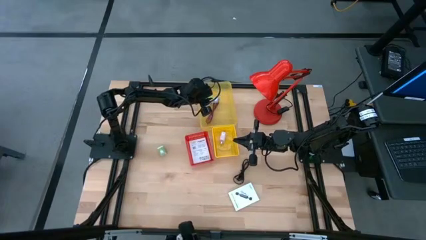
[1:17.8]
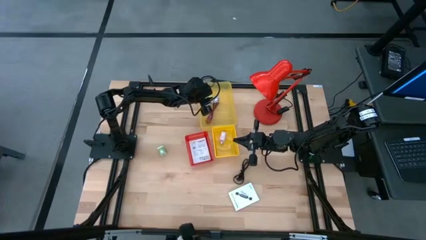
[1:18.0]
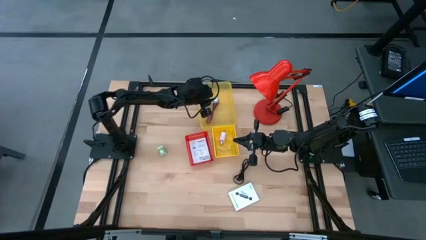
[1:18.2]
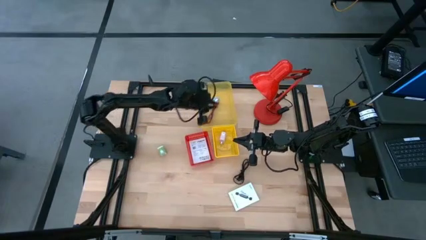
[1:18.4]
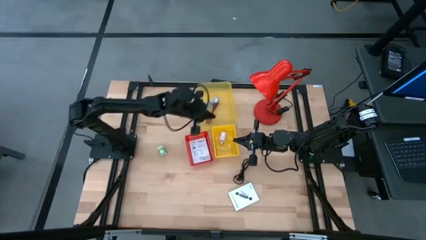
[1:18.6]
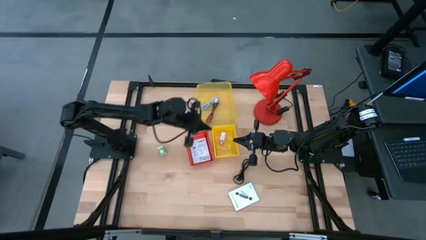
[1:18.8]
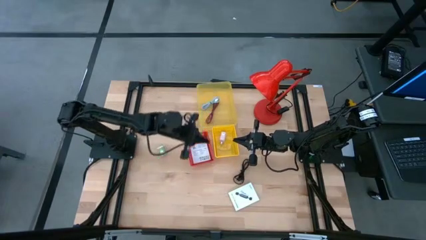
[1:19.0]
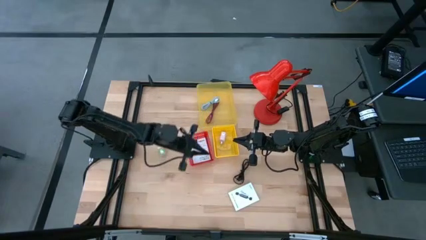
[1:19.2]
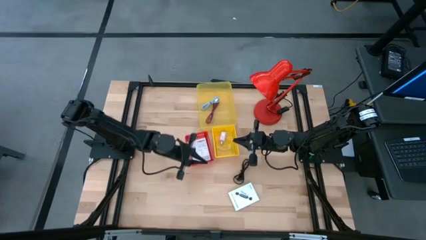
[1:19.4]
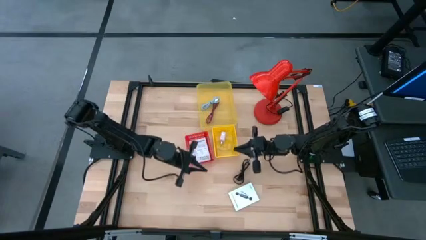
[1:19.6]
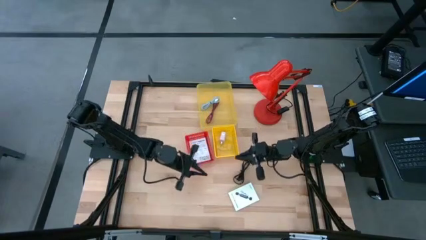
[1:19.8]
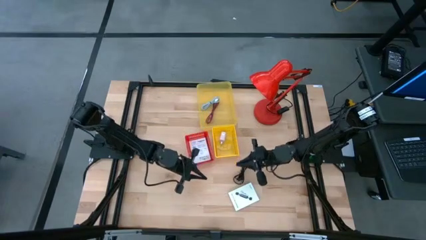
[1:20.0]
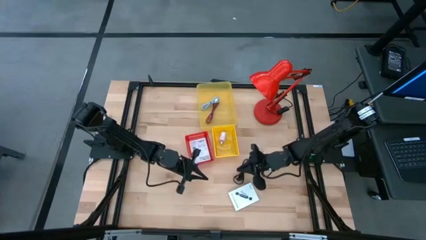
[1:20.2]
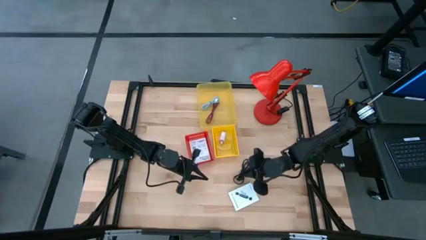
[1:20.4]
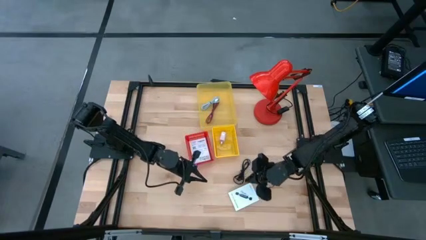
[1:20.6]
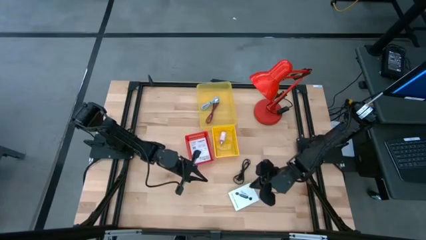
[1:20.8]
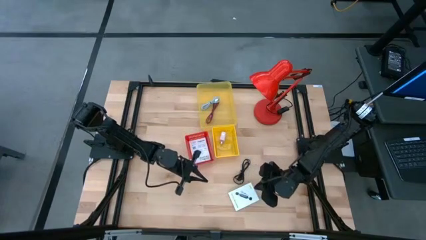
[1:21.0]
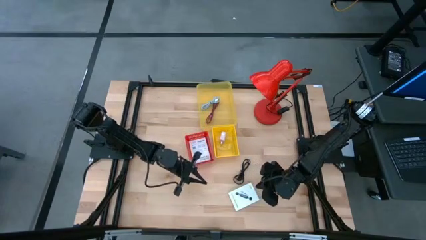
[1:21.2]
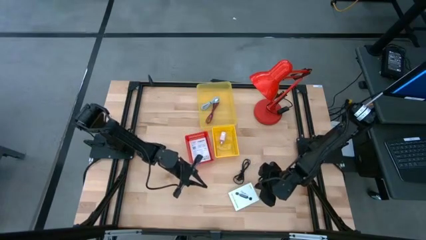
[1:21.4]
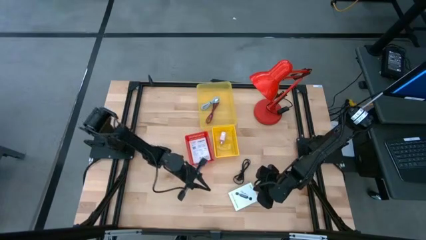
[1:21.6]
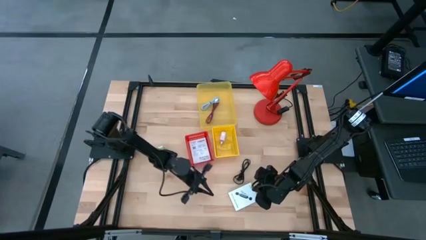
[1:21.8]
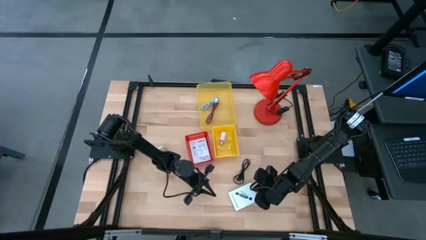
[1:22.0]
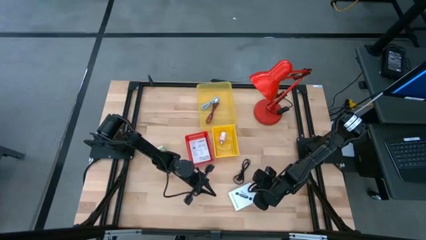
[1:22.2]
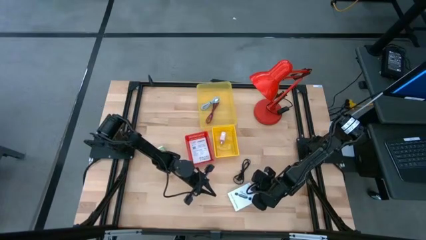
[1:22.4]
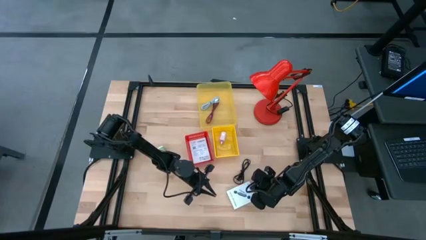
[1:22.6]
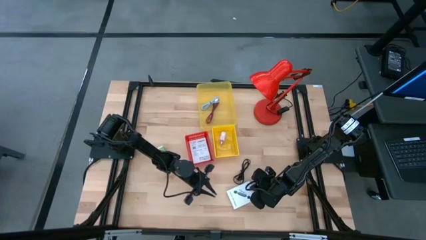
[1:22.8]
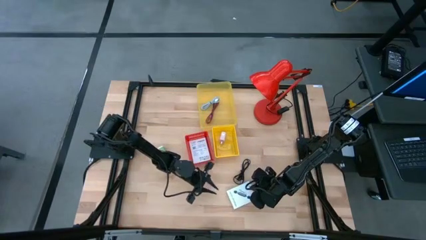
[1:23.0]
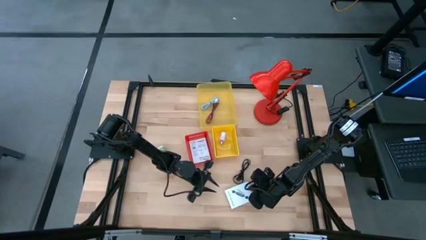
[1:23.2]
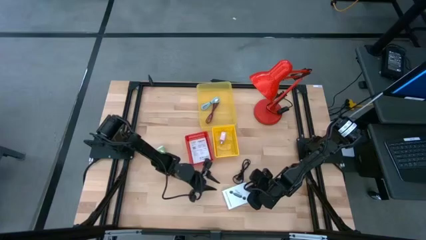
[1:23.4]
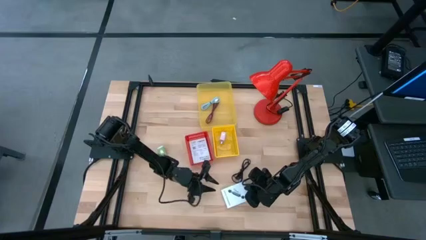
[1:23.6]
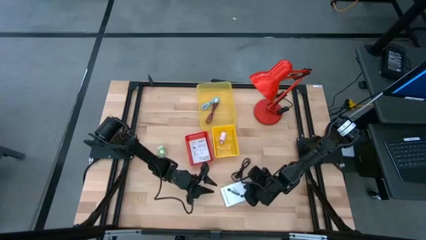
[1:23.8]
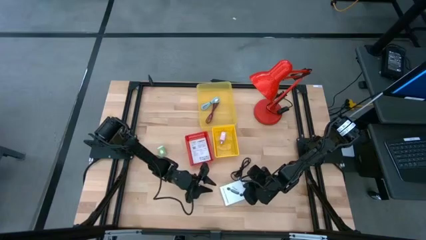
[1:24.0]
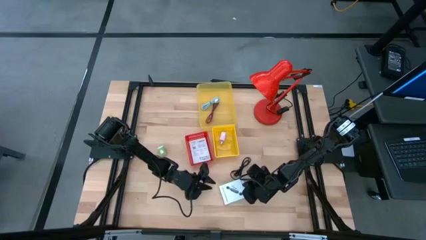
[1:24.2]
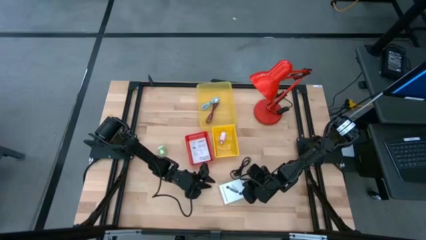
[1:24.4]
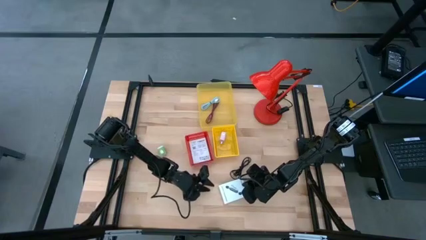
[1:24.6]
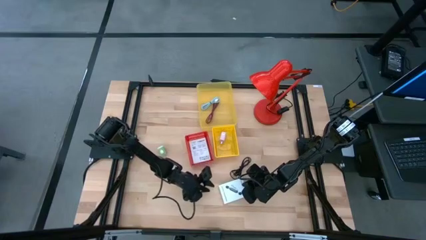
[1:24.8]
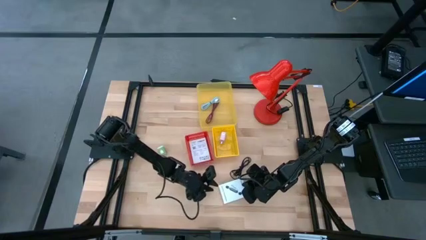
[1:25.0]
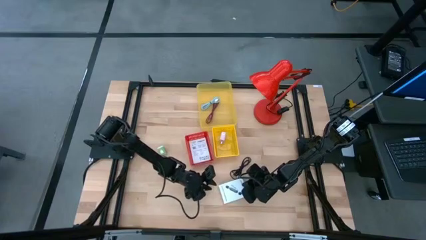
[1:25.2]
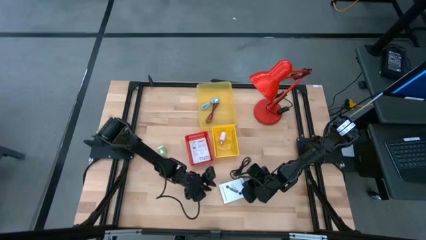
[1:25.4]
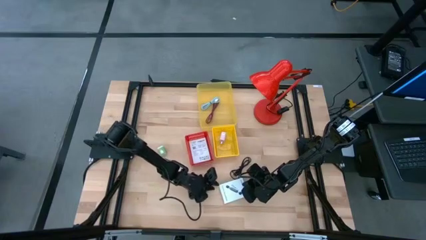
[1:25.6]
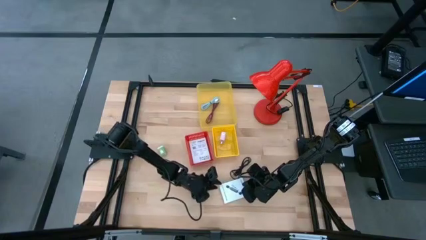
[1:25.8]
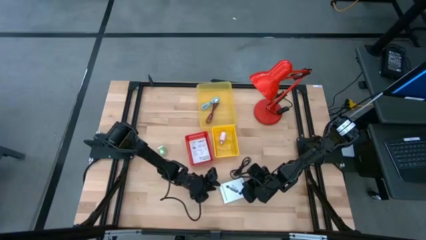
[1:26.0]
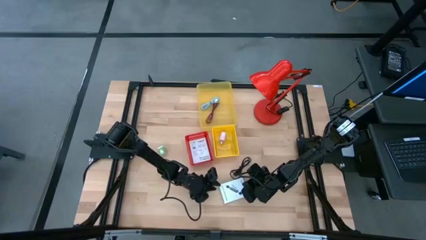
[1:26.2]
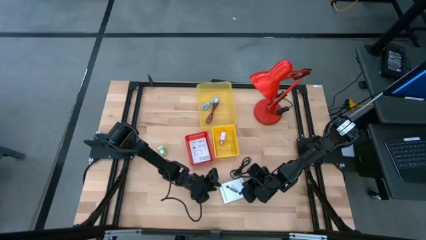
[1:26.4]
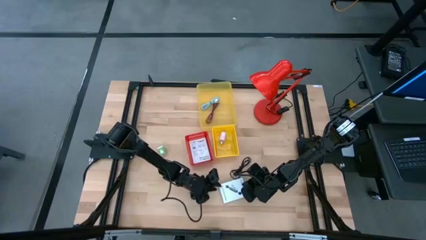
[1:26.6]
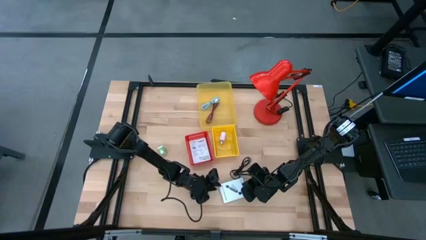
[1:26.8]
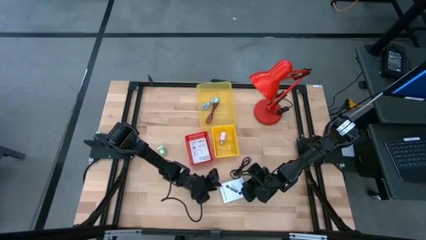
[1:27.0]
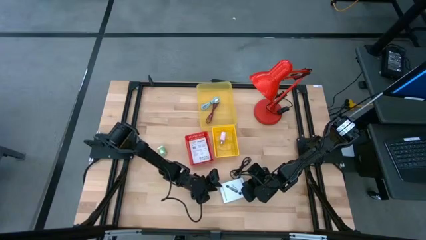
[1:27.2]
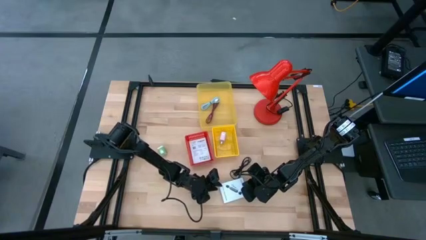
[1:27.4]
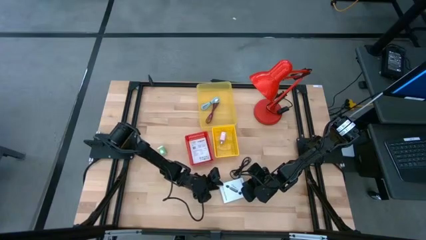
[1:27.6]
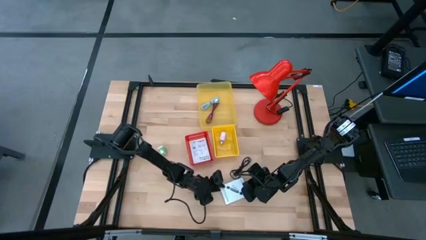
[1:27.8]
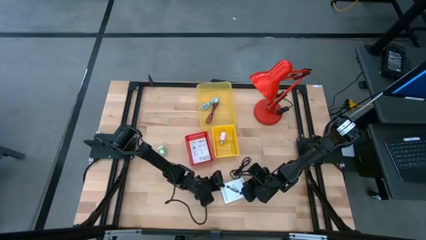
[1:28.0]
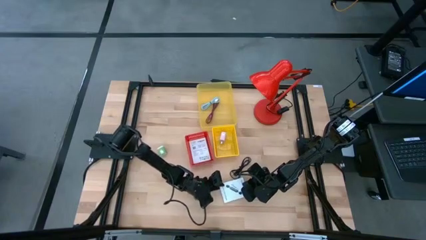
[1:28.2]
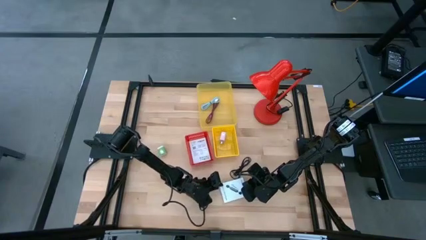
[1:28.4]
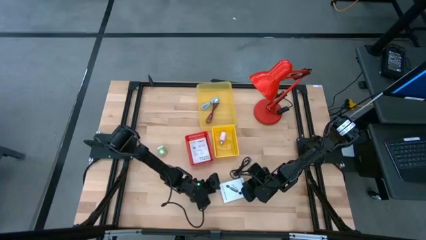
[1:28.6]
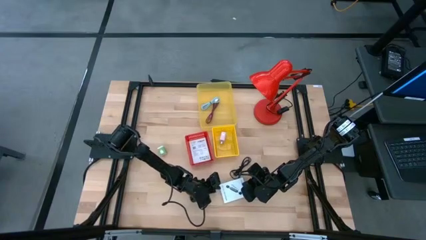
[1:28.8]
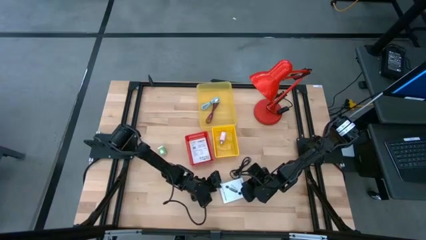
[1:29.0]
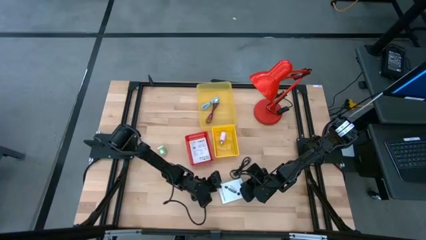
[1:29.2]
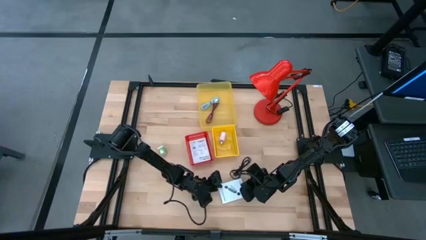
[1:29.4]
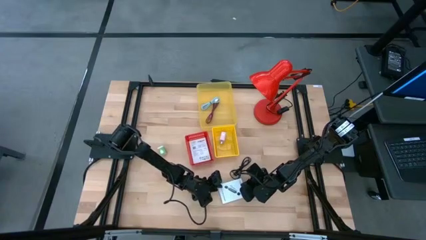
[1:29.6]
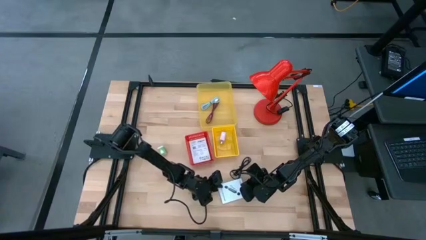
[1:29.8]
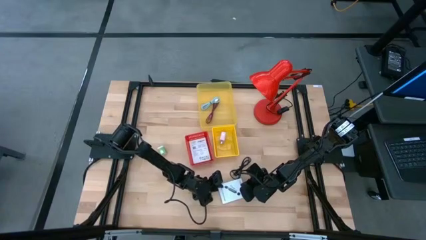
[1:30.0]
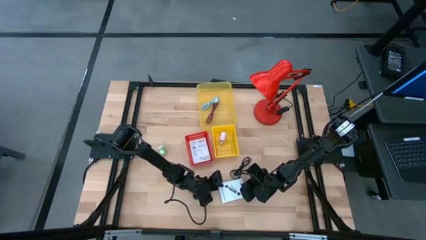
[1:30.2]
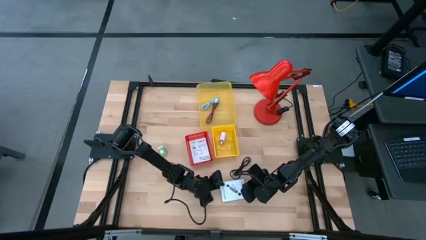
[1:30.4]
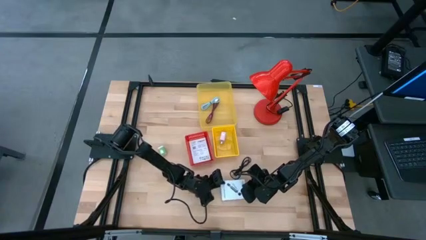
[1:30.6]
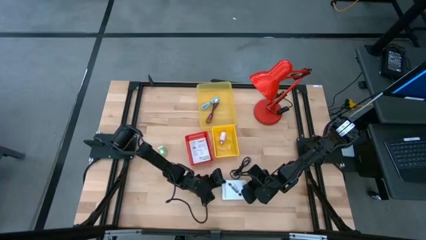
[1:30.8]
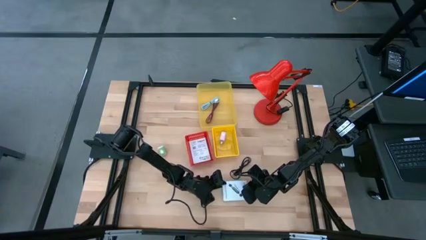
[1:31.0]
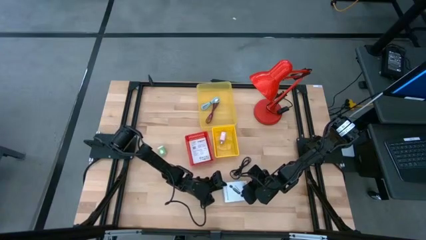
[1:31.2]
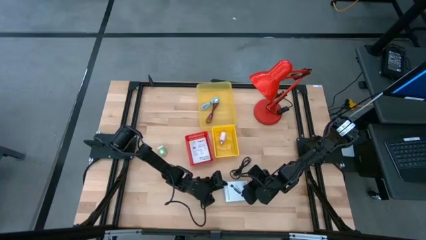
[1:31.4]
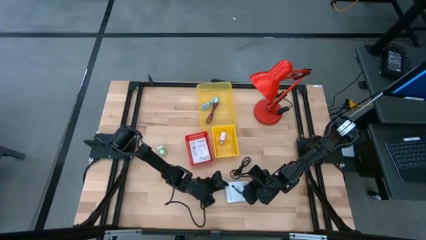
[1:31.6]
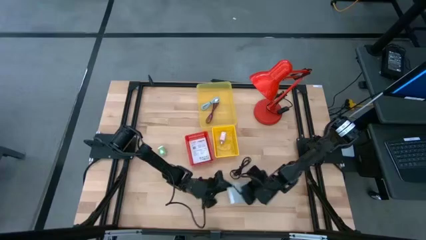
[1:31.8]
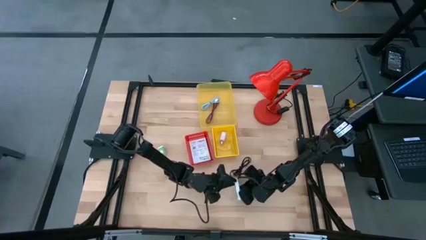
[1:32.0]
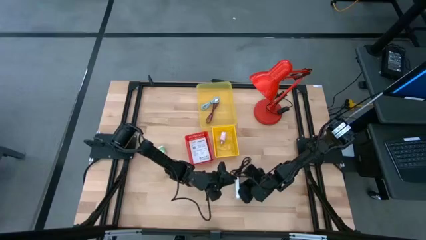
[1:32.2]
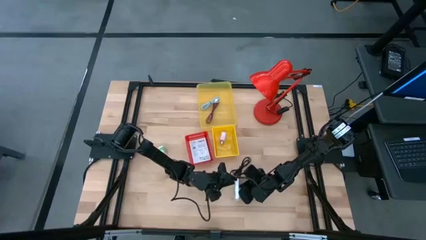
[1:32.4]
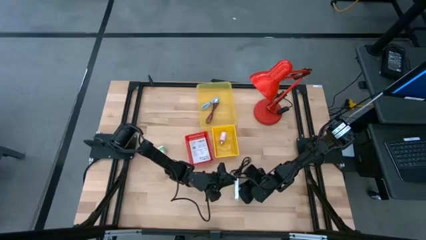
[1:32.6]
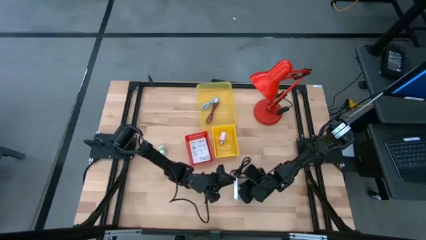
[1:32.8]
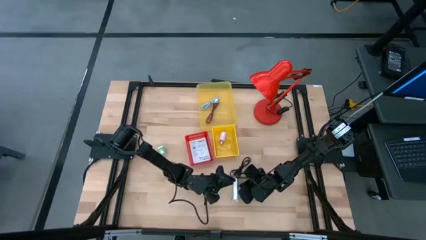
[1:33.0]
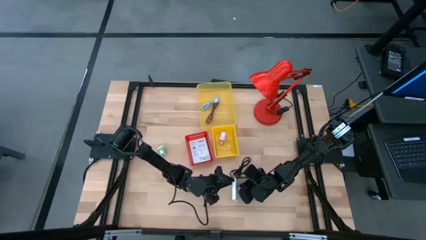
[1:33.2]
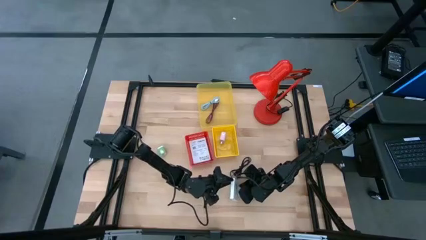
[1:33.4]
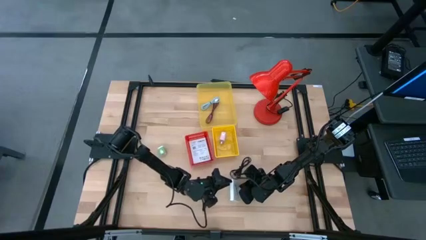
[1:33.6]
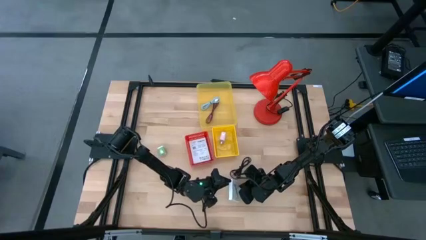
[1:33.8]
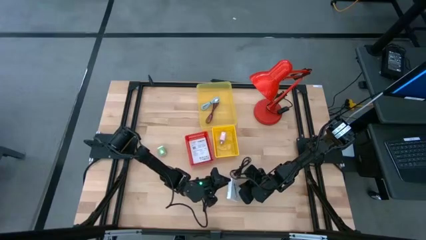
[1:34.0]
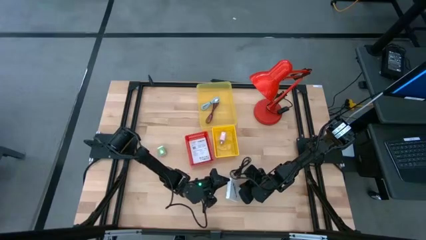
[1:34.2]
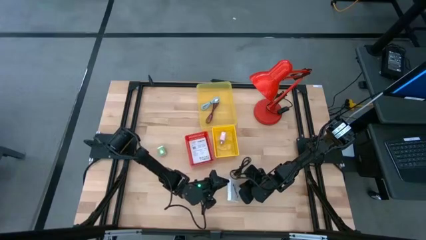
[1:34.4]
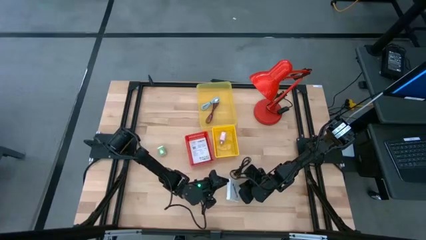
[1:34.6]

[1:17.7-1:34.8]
Task: Pick and place items into bin
Put the white card reader box into the red bin
